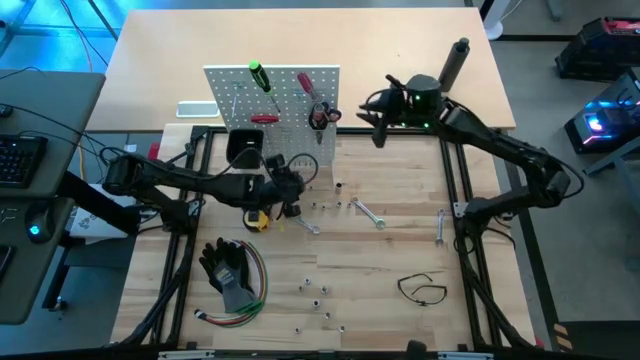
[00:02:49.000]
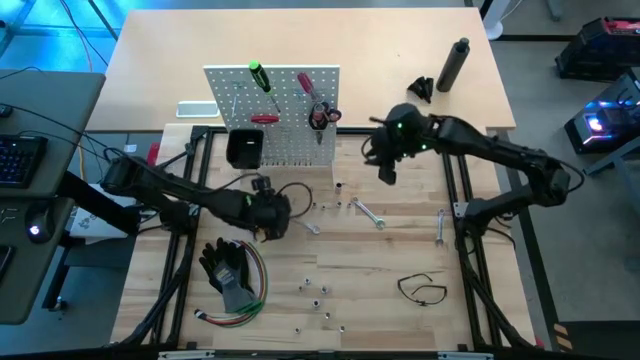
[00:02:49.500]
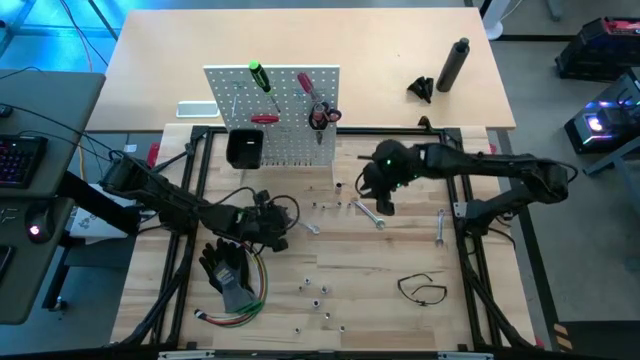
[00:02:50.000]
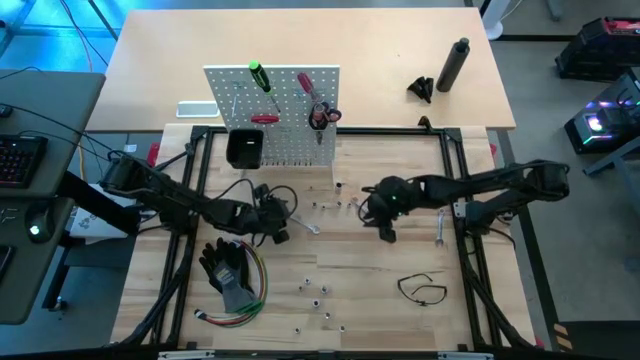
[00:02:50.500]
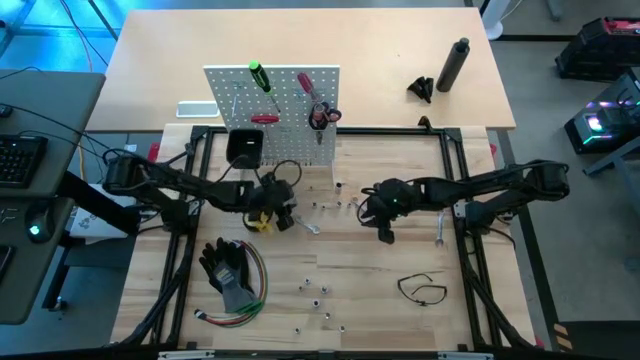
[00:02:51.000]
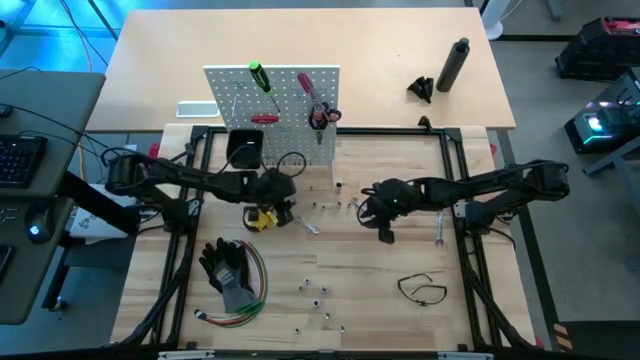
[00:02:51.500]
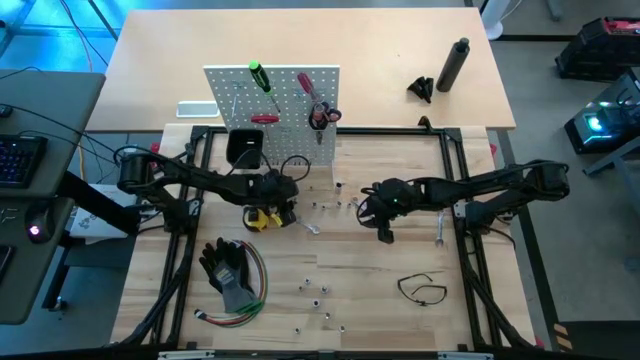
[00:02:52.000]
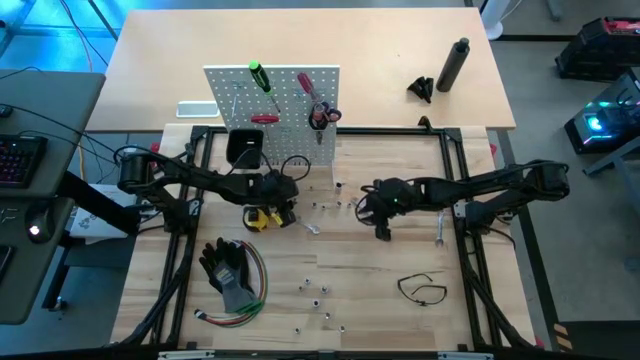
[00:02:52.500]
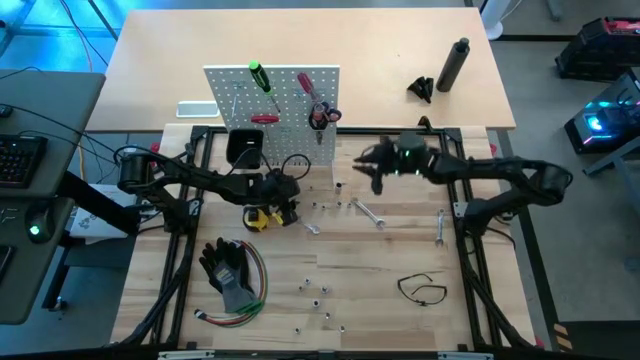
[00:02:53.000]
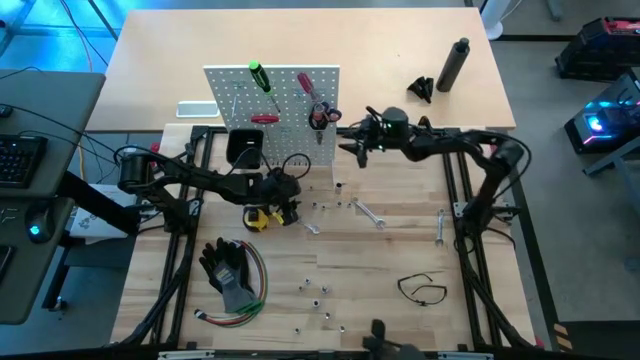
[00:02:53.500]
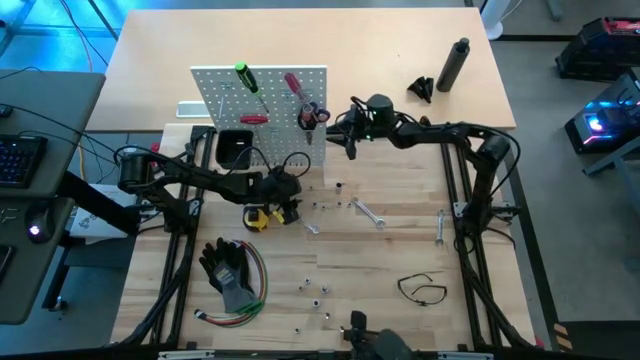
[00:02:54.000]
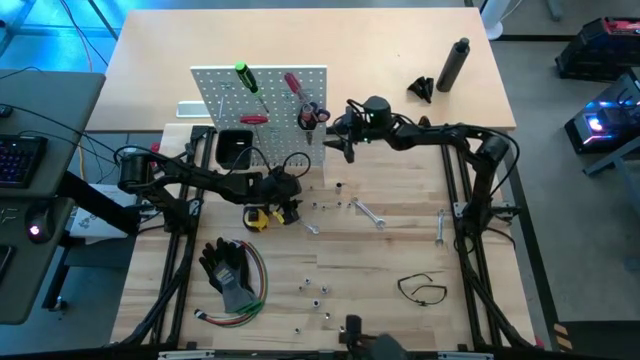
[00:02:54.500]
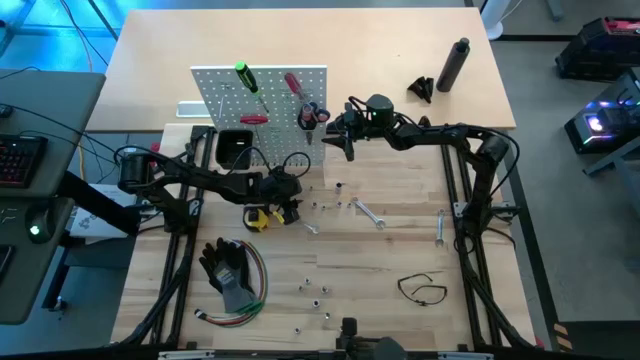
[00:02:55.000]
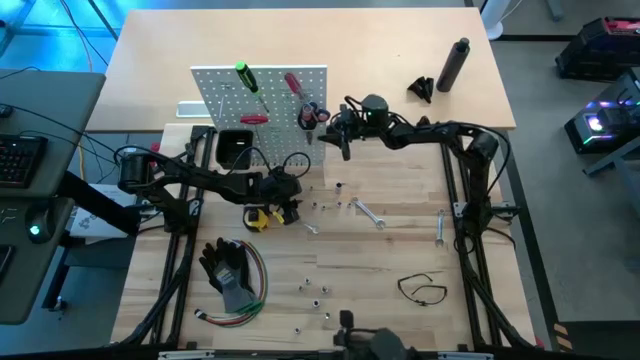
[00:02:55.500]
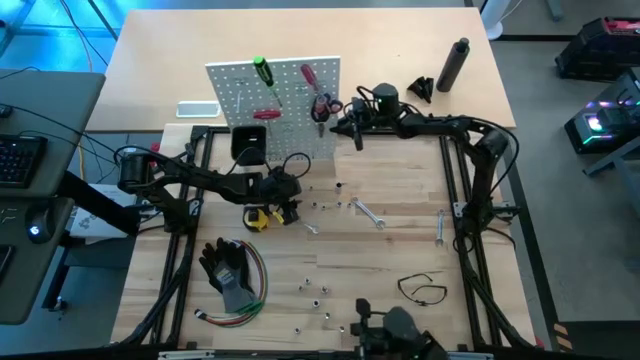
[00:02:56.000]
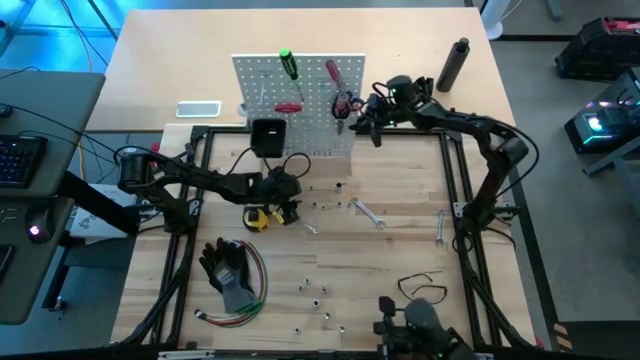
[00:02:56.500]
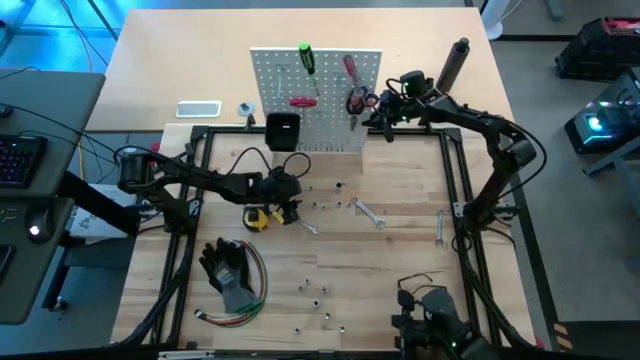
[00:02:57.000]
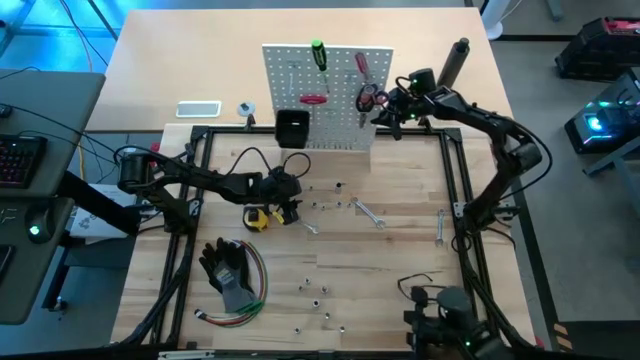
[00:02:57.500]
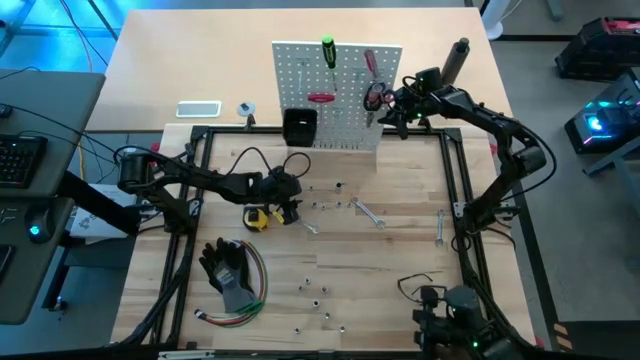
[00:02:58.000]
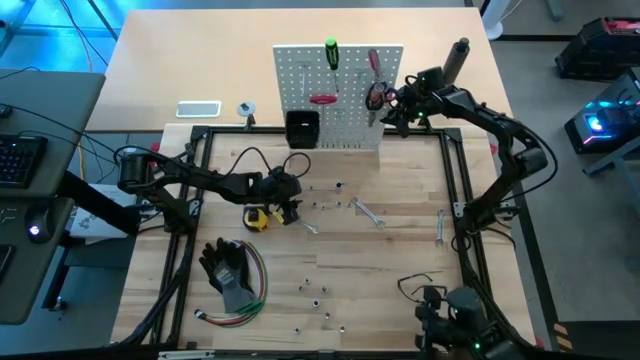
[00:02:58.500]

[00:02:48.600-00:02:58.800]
Task: Hang tools onto peg board
Adjust the white peg board

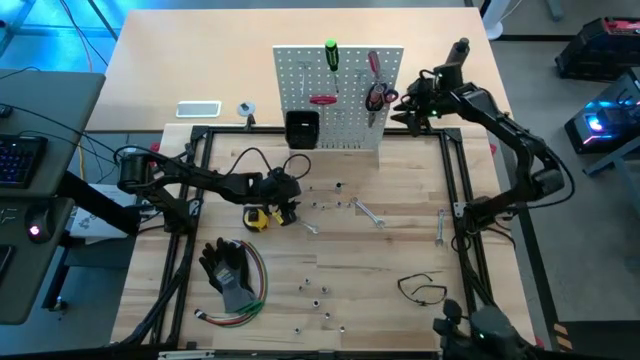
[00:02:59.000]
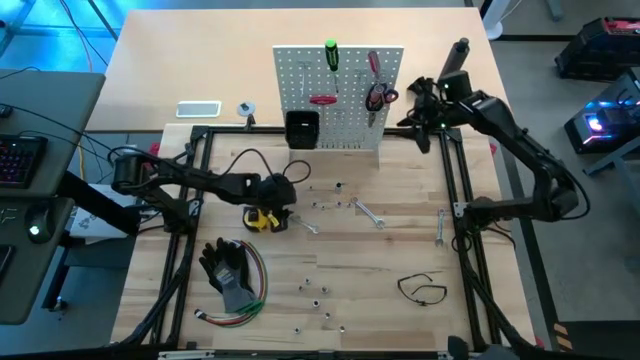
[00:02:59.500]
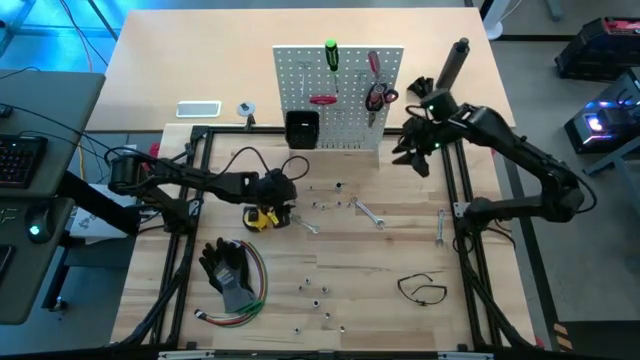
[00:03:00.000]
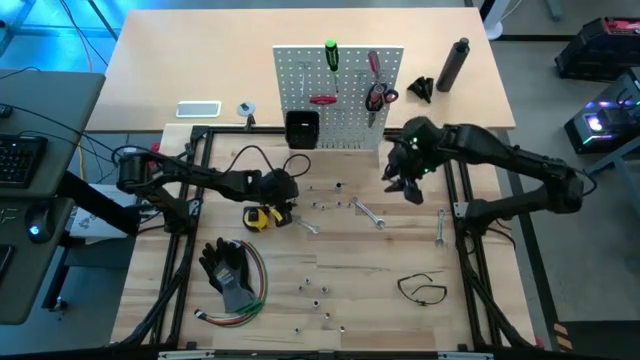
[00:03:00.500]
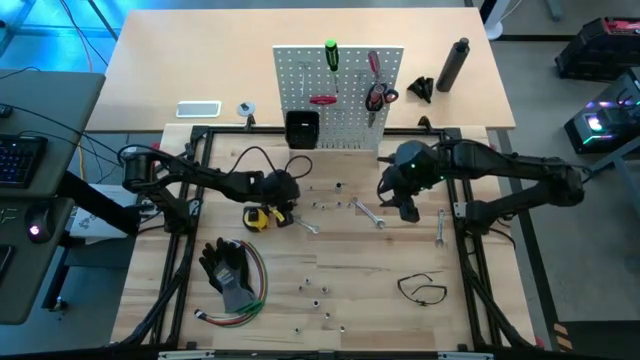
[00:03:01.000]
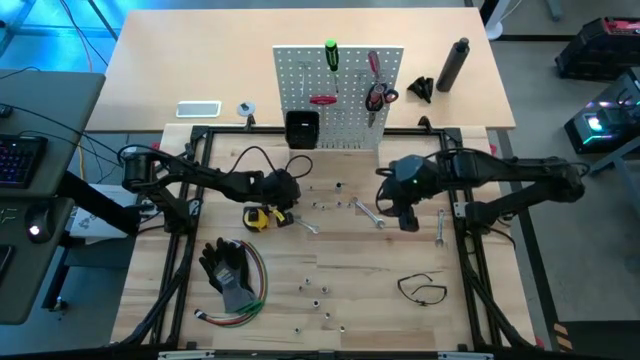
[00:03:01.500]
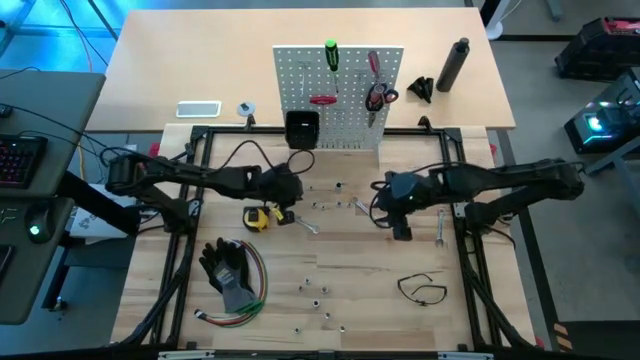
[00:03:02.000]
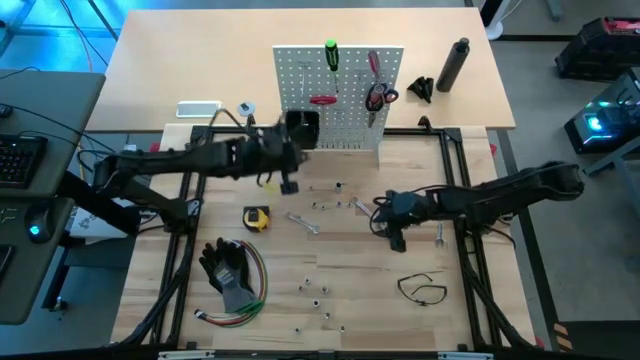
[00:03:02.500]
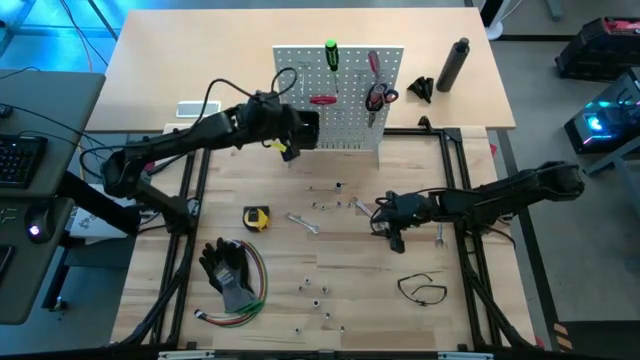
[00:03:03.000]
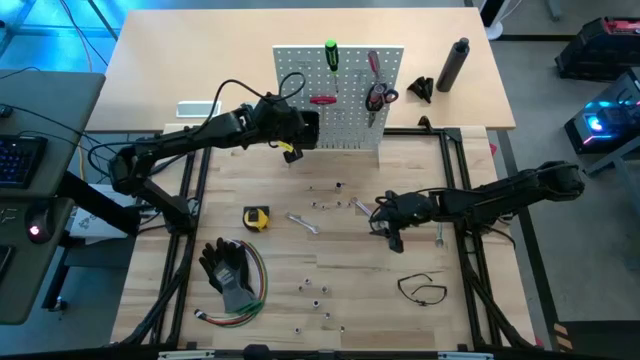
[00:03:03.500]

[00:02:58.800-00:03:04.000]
Put the silver socket into the black bin on the white peg board

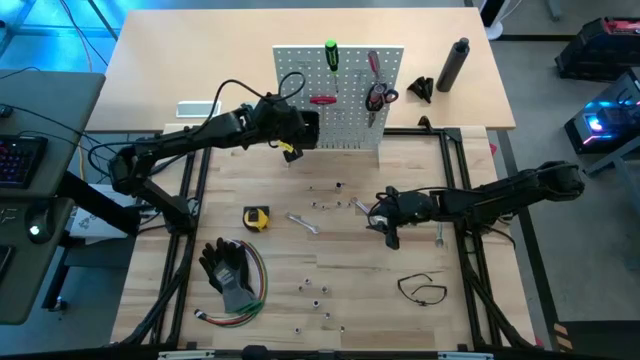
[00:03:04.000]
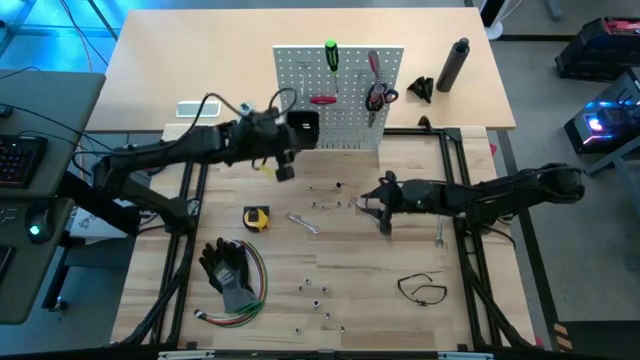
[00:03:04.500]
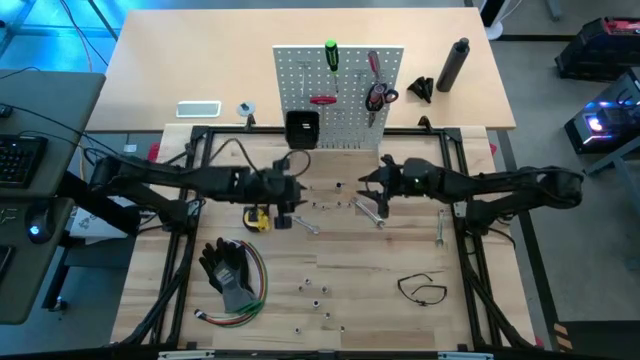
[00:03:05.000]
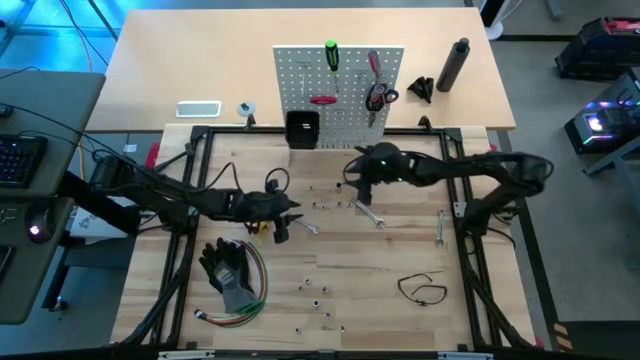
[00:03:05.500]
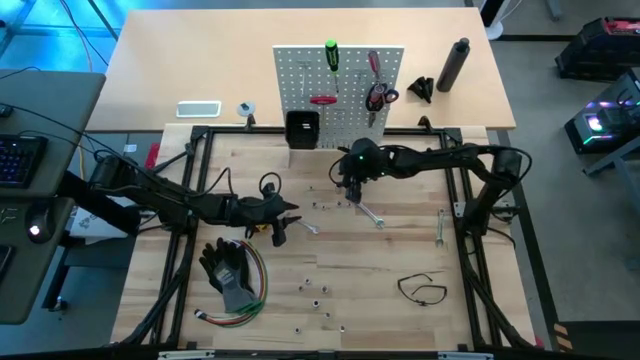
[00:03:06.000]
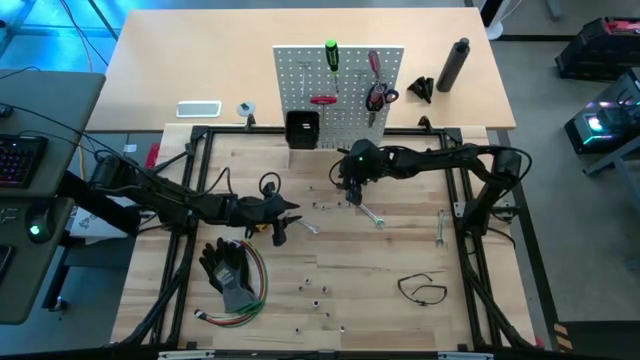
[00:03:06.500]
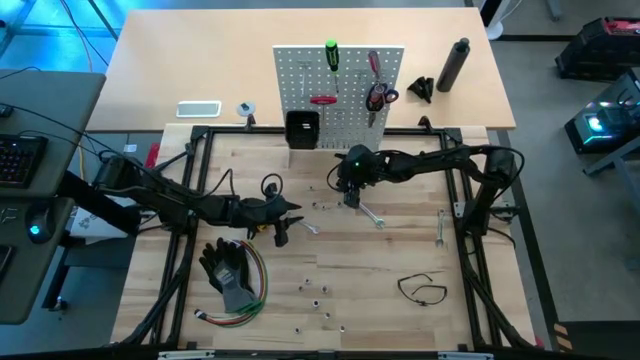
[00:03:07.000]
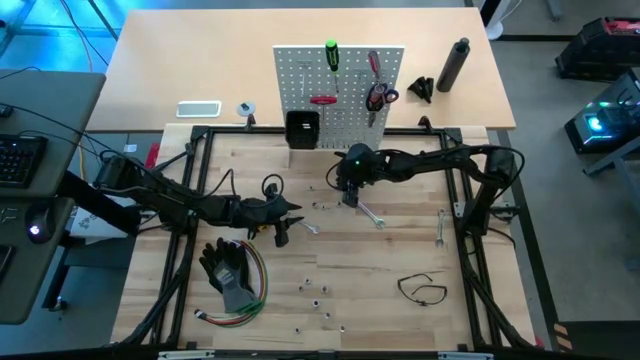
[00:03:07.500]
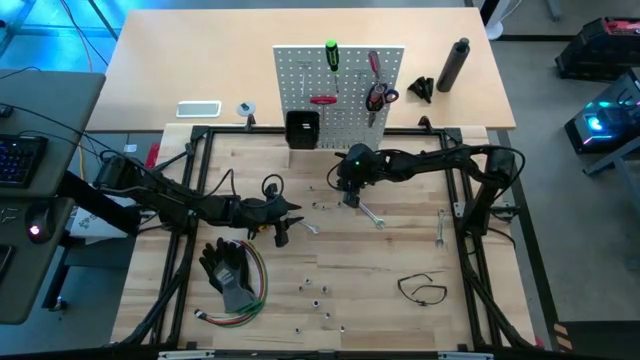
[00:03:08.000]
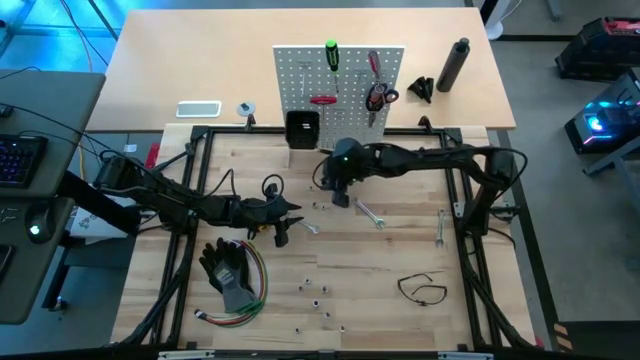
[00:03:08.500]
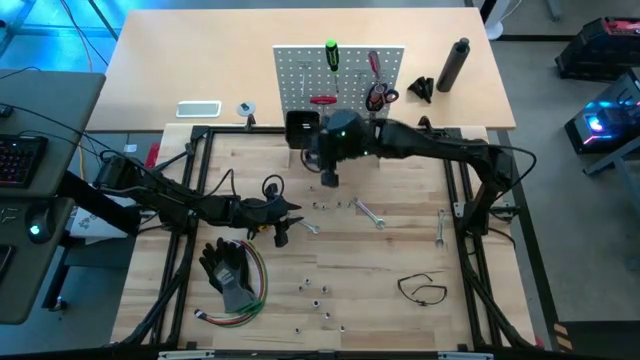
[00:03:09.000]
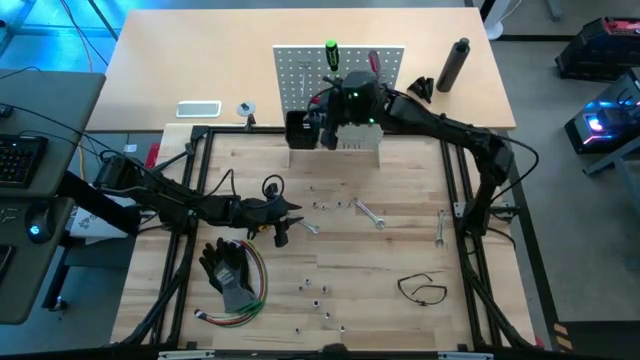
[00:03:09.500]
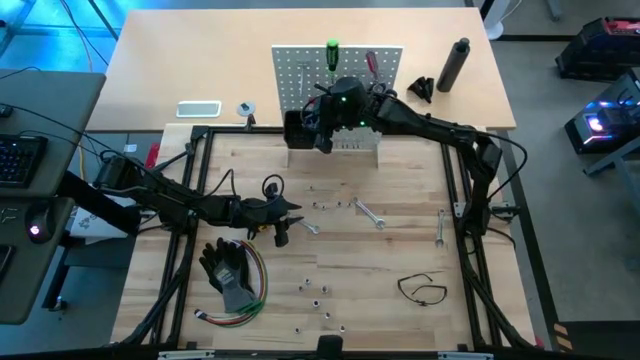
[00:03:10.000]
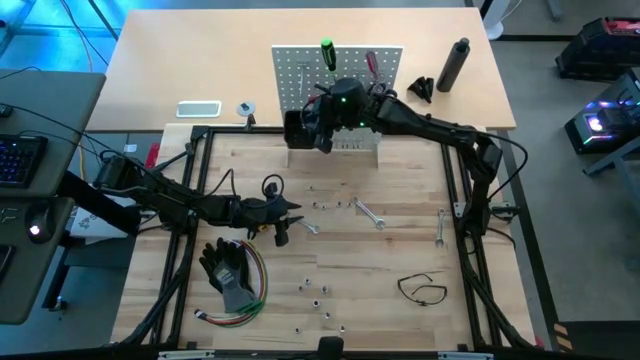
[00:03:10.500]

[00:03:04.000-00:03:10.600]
Put the silver socket into the black bin on the white peg board
